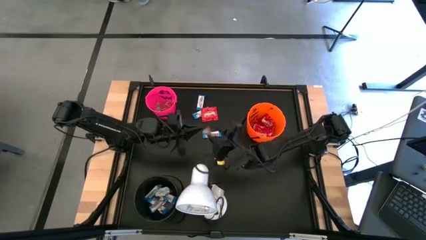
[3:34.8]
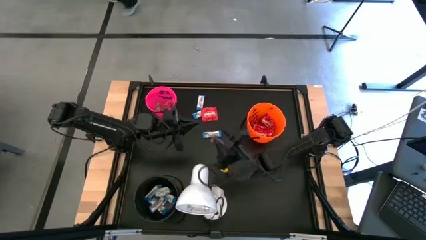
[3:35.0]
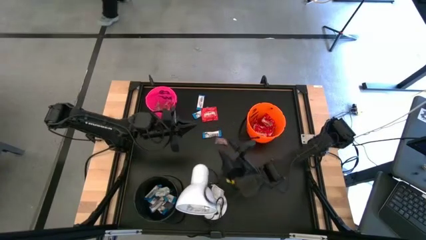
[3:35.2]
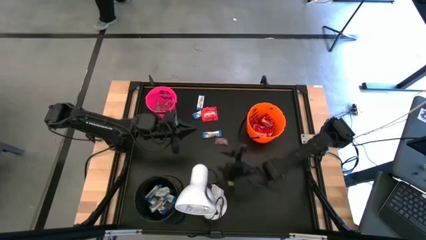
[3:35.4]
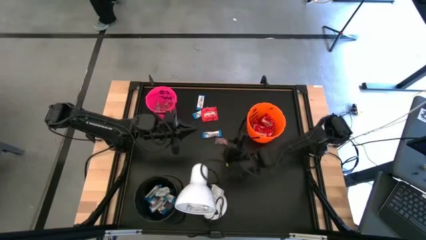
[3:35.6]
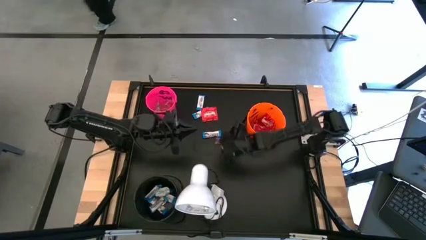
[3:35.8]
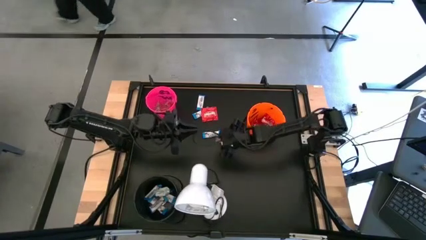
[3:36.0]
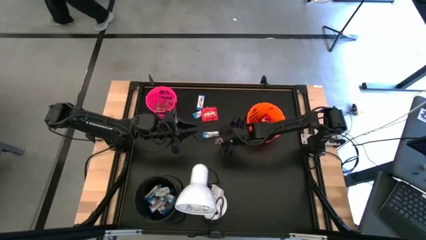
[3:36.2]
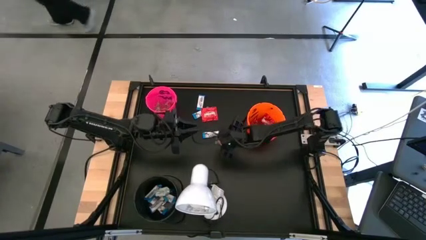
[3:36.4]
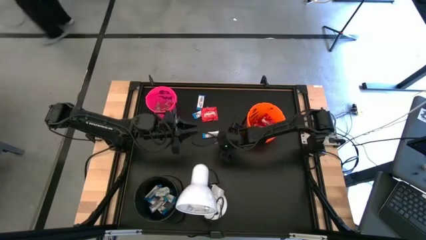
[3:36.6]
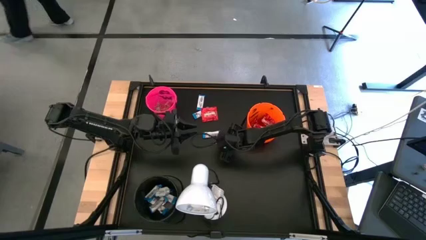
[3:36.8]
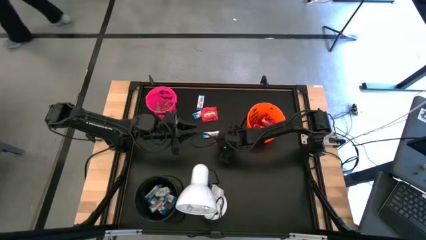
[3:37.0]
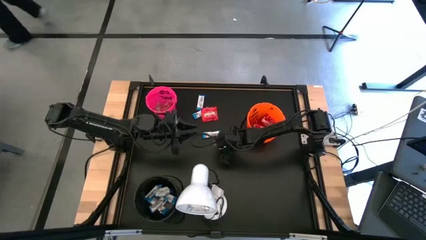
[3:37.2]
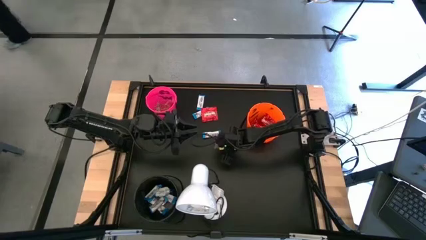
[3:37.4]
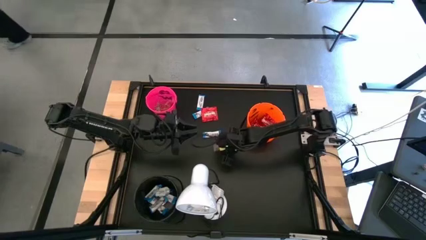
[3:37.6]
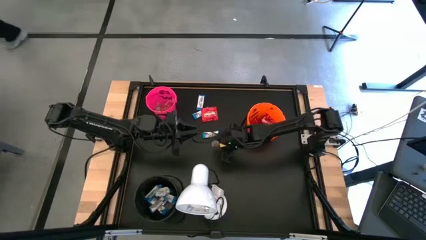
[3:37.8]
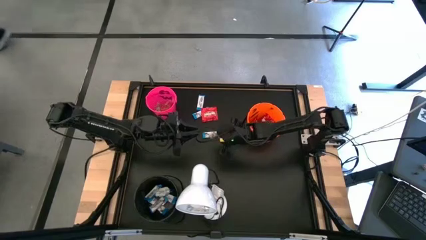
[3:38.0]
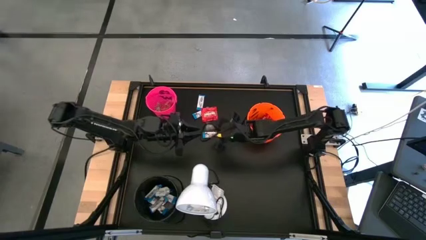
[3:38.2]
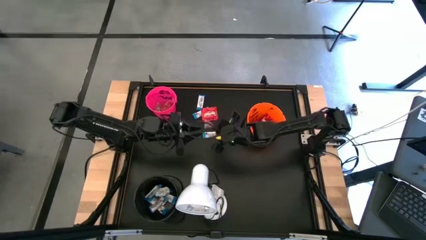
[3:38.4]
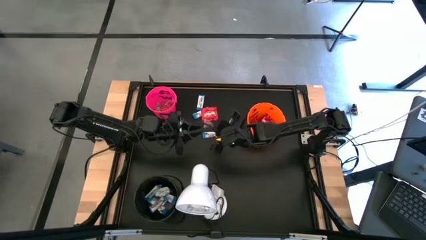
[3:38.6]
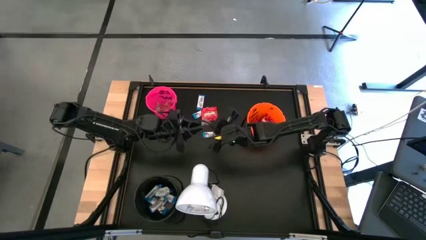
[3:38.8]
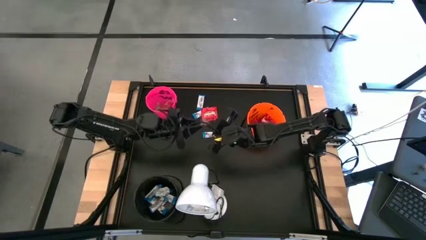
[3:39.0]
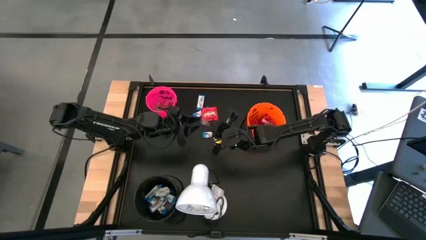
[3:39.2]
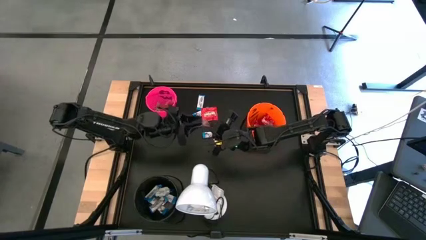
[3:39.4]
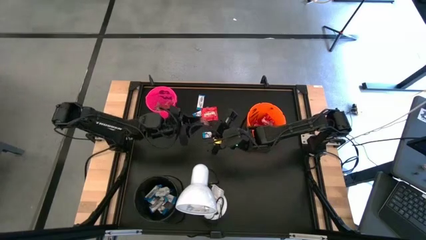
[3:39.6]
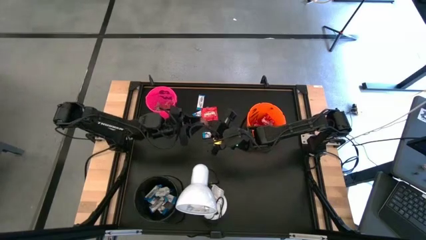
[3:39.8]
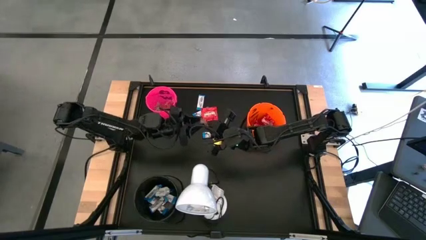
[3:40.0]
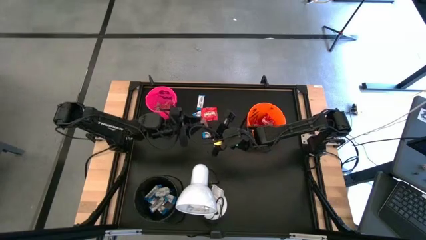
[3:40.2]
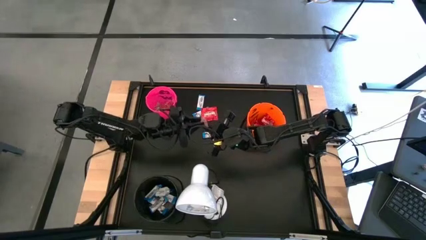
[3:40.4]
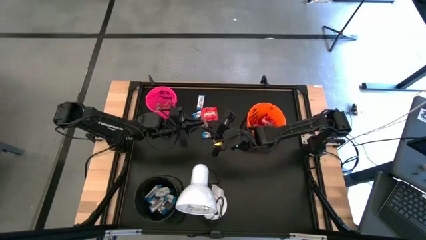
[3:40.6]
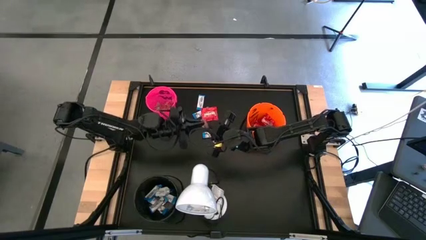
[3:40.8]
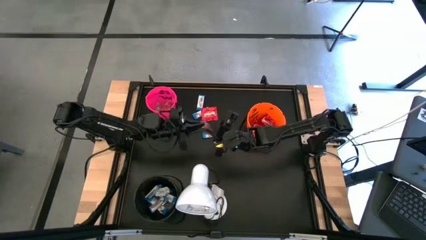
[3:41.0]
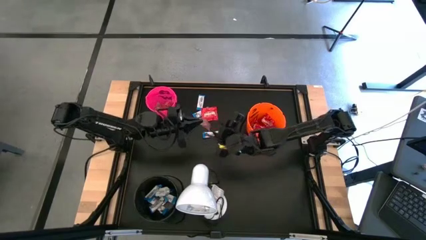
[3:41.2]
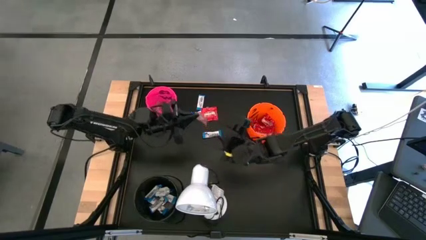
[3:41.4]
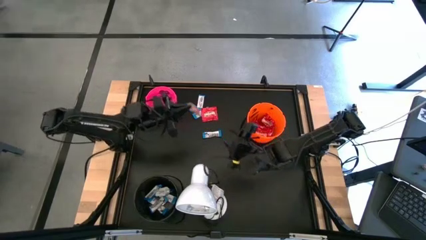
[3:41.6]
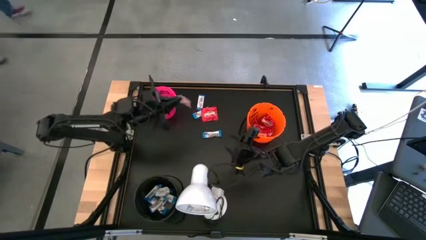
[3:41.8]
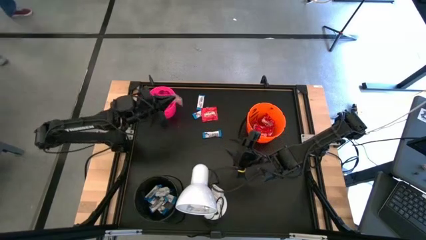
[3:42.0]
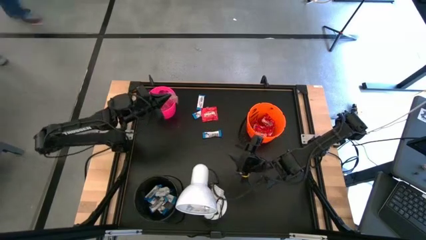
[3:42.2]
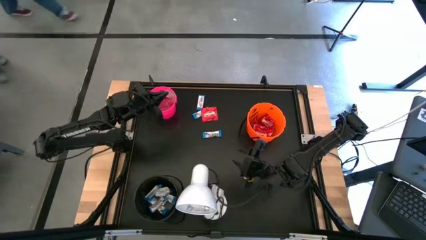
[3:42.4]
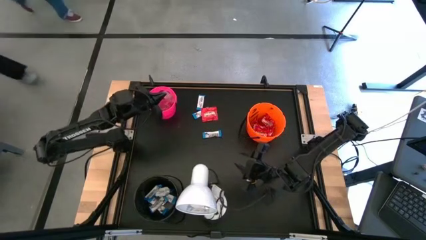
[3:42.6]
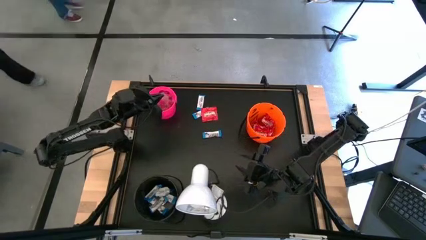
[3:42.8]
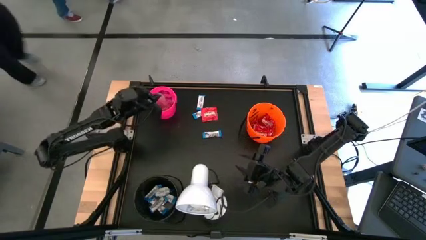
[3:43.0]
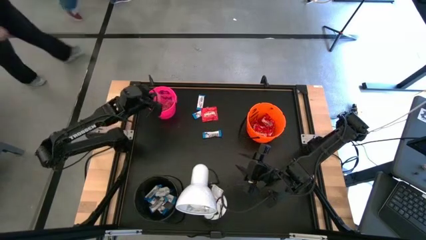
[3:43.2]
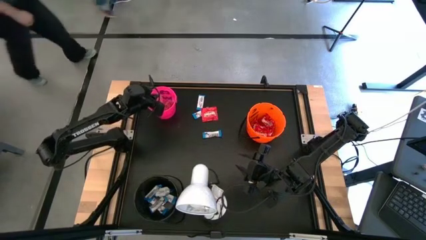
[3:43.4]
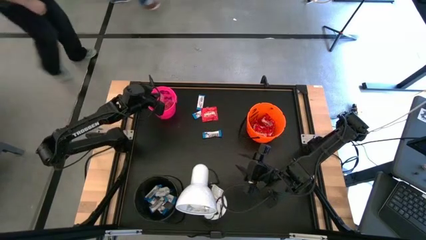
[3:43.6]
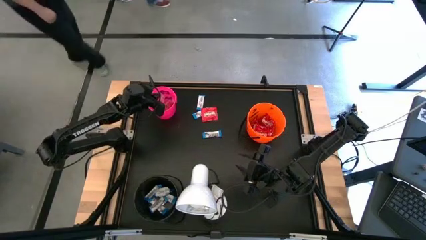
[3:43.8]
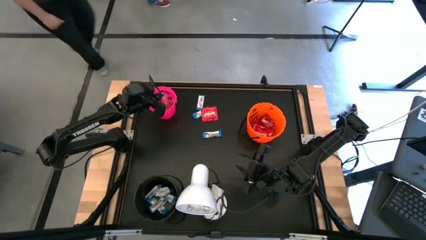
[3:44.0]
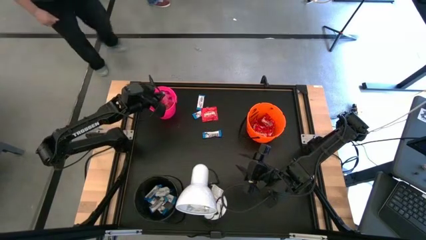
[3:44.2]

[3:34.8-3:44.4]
Task: Sort candy
Put the orange gummy into the pink bucket

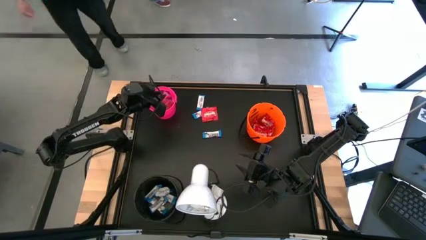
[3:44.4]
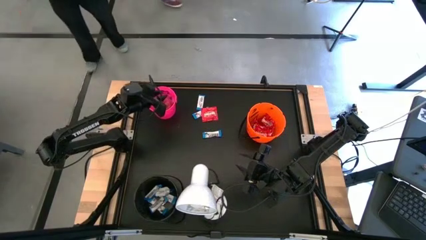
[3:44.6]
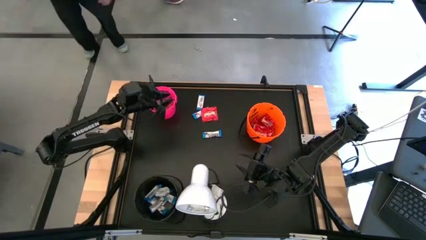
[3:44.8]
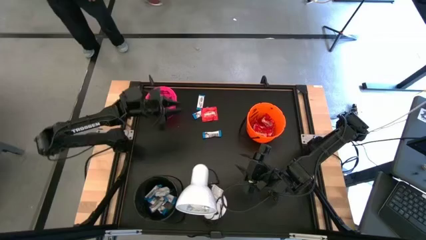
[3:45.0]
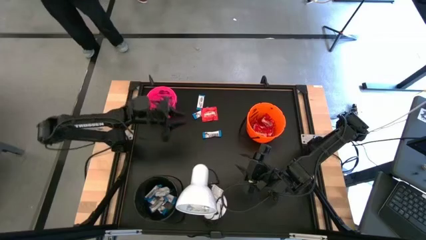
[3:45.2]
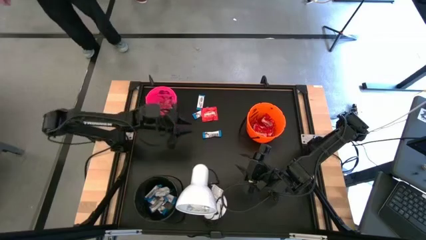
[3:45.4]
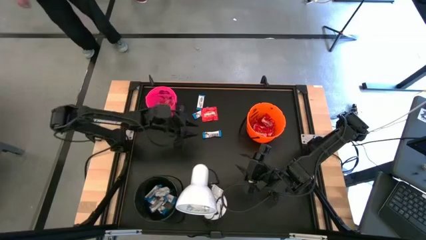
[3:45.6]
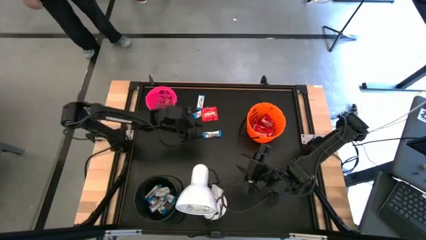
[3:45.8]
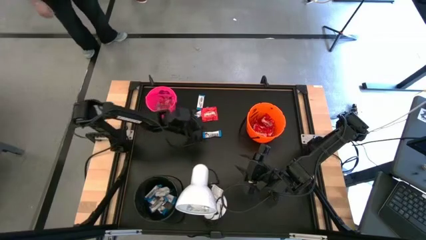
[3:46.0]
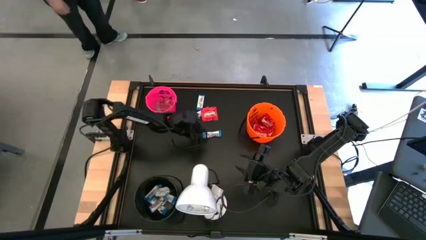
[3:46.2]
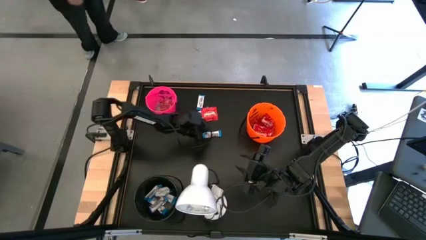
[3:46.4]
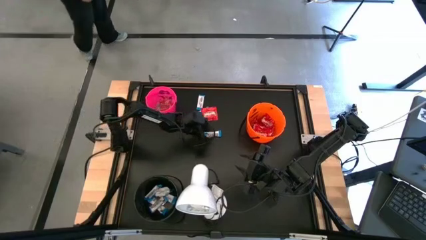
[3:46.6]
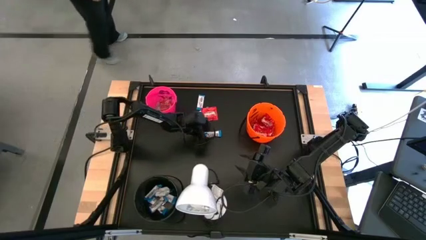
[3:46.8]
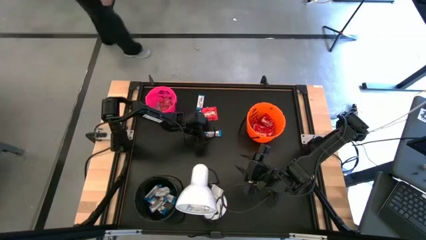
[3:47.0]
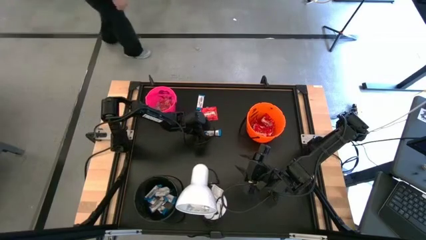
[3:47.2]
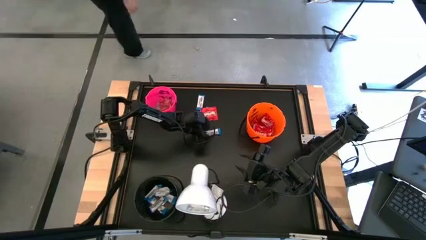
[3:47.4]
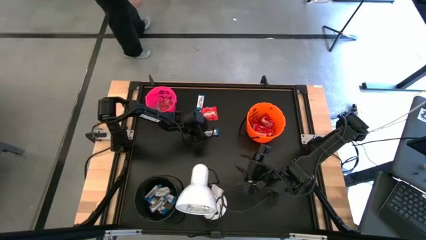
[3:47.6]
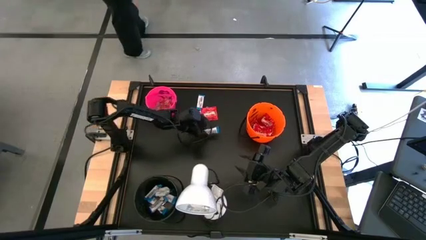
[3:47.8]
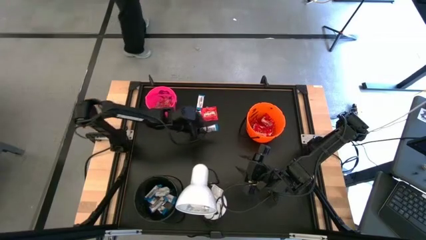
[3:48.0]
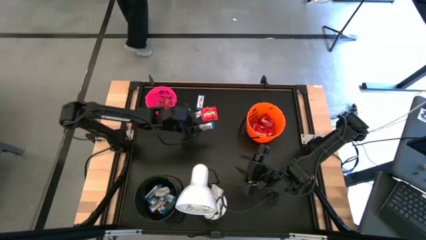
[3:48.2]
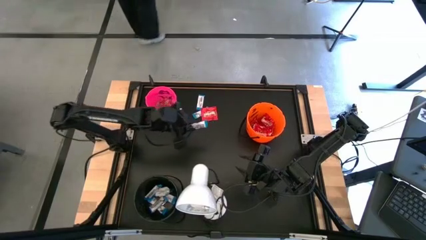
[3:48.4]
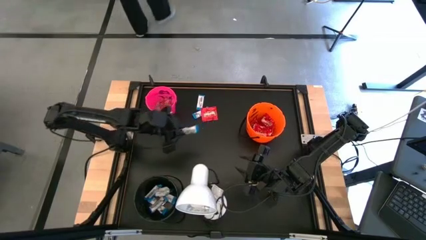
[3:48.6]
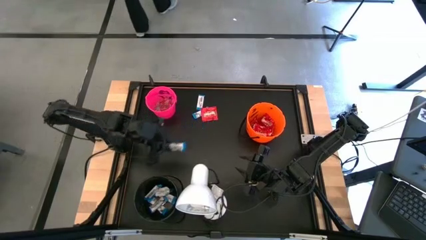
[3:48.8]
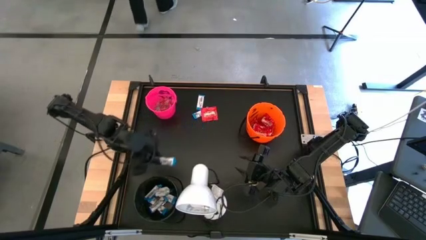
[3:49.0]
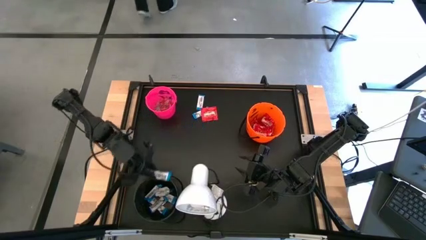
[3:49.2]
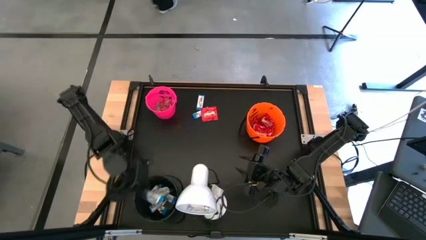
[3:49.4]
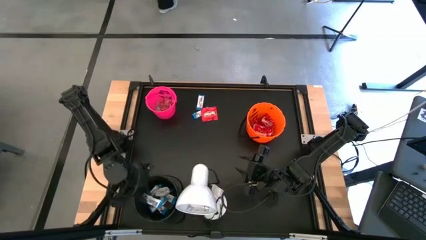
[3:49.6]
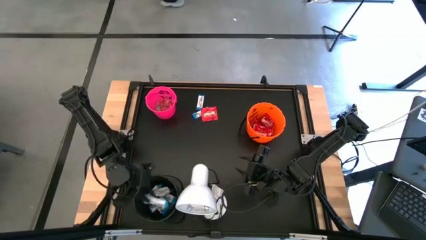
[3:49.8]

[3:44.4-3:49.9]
Put the white chocolate into the black bucket
